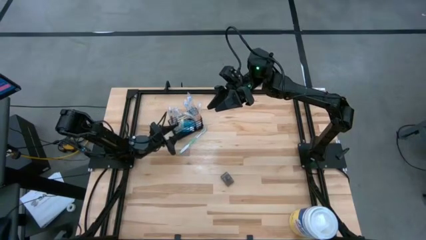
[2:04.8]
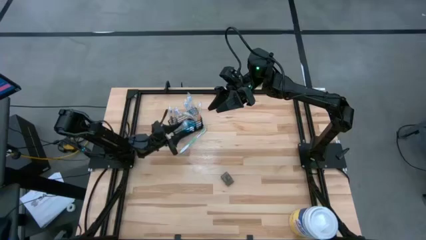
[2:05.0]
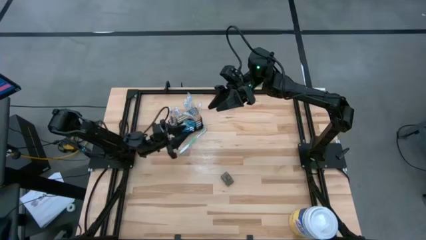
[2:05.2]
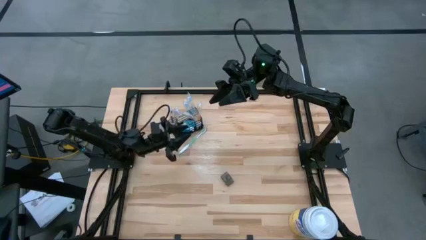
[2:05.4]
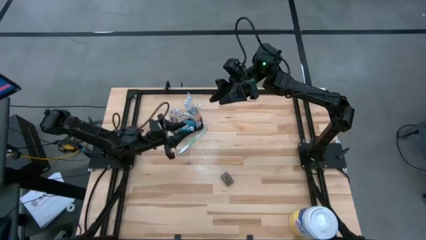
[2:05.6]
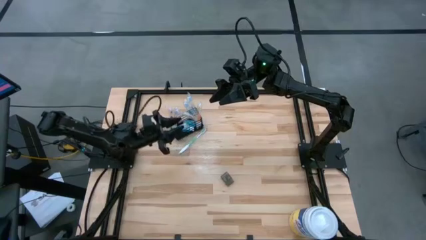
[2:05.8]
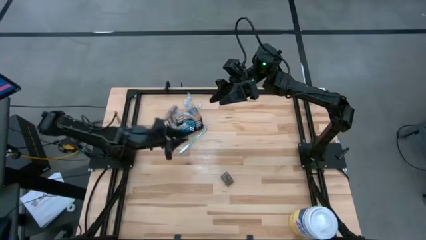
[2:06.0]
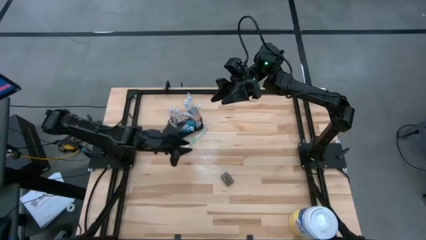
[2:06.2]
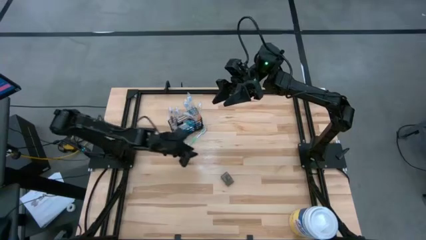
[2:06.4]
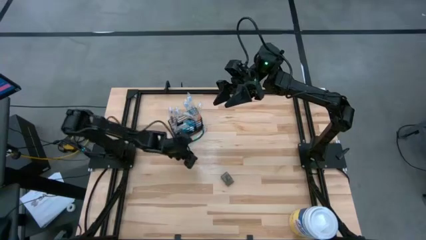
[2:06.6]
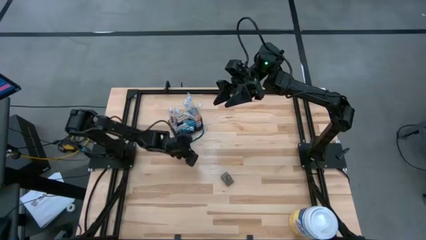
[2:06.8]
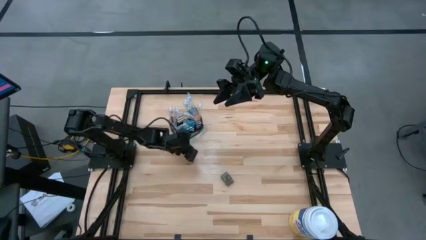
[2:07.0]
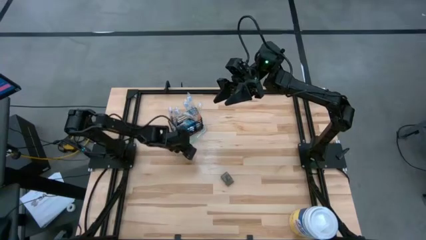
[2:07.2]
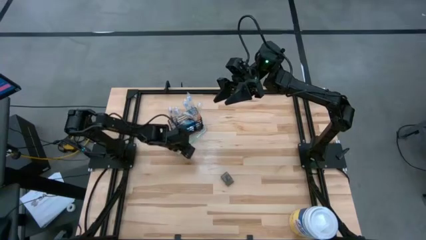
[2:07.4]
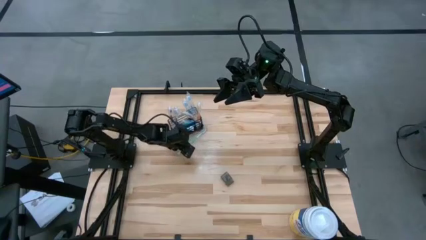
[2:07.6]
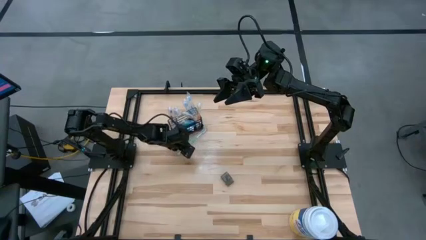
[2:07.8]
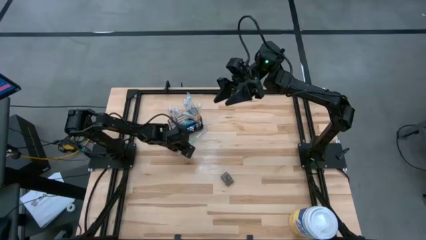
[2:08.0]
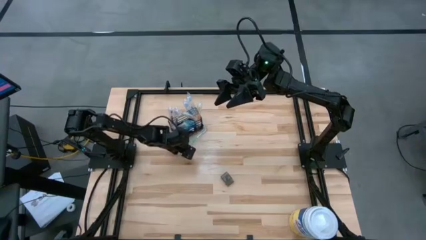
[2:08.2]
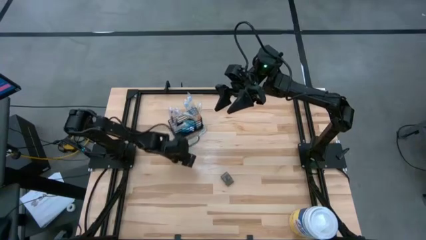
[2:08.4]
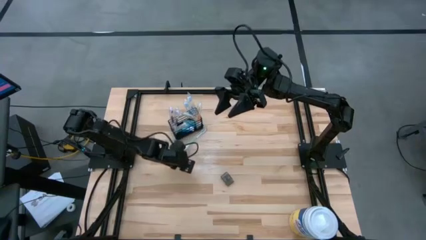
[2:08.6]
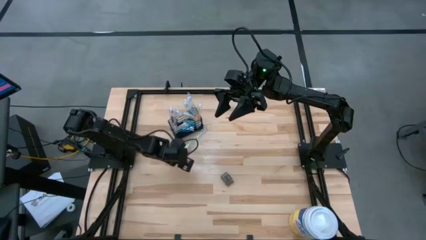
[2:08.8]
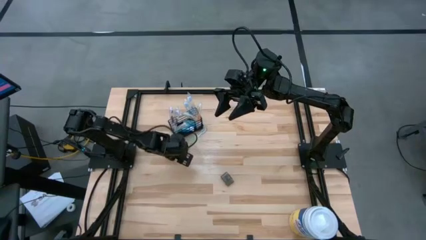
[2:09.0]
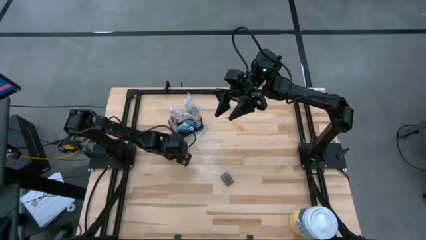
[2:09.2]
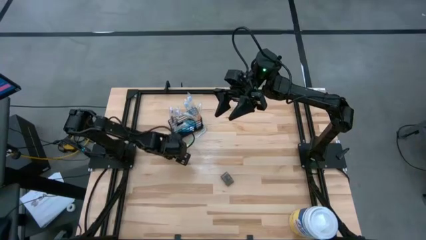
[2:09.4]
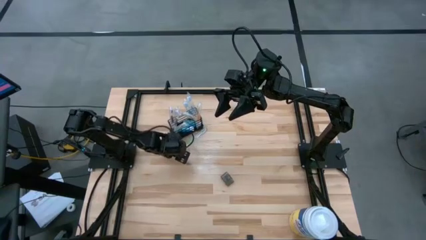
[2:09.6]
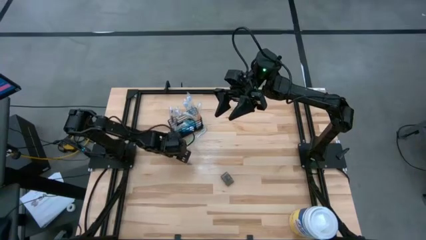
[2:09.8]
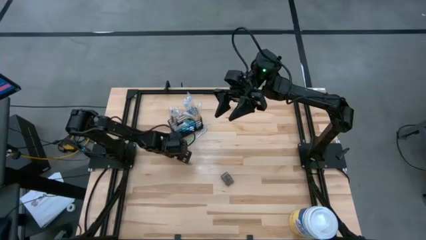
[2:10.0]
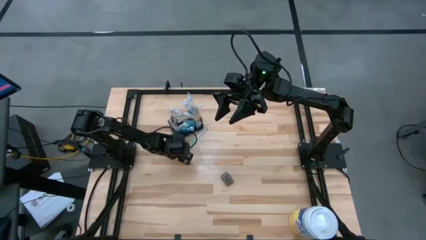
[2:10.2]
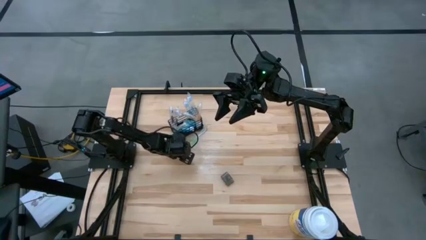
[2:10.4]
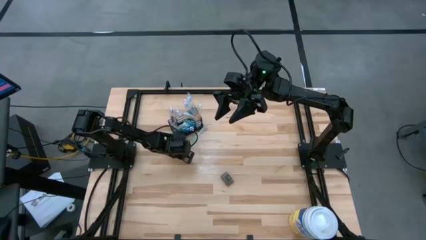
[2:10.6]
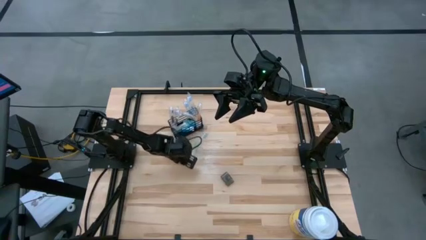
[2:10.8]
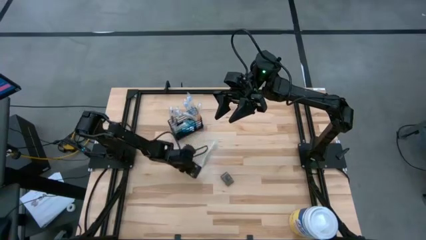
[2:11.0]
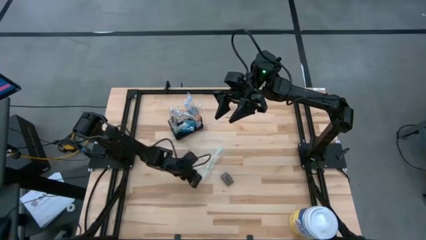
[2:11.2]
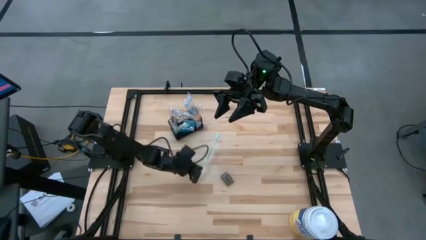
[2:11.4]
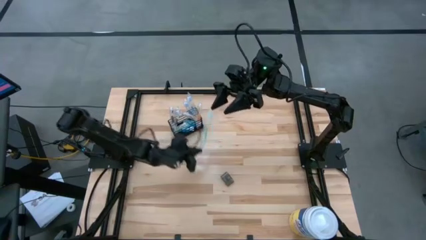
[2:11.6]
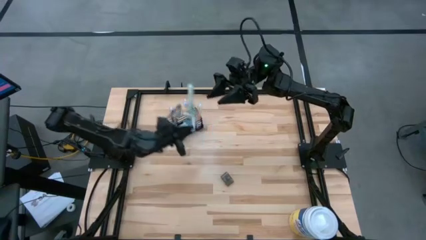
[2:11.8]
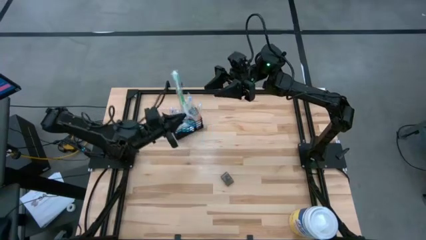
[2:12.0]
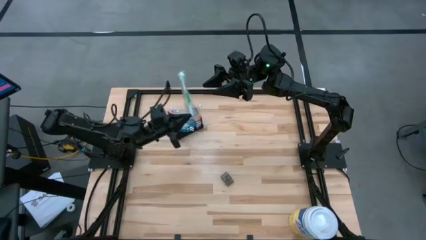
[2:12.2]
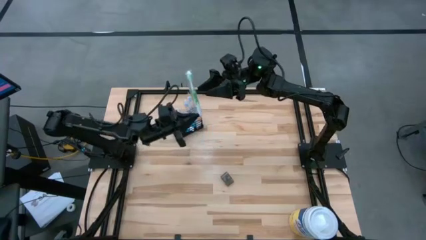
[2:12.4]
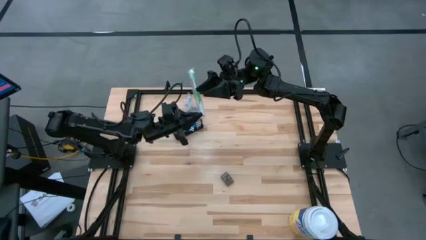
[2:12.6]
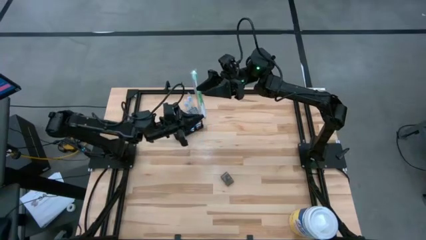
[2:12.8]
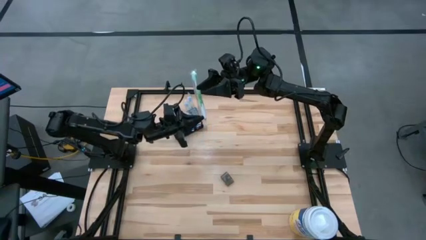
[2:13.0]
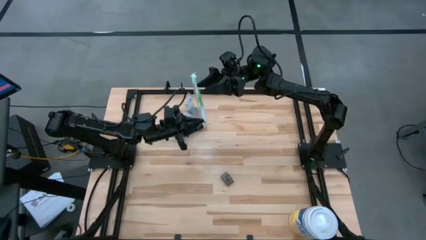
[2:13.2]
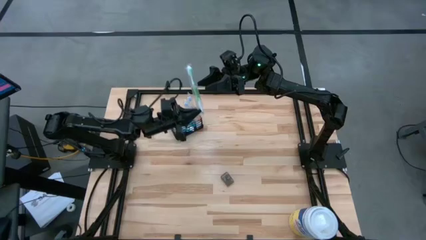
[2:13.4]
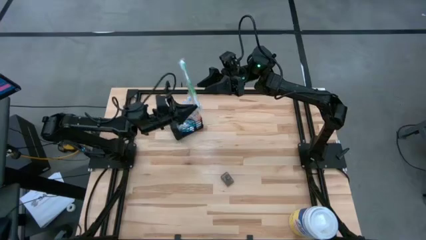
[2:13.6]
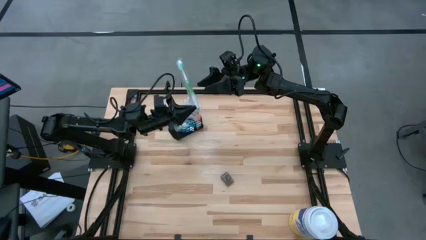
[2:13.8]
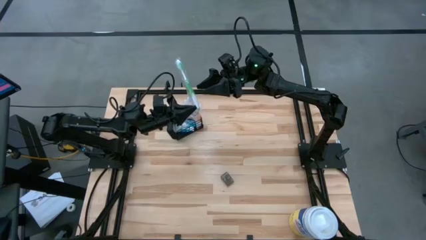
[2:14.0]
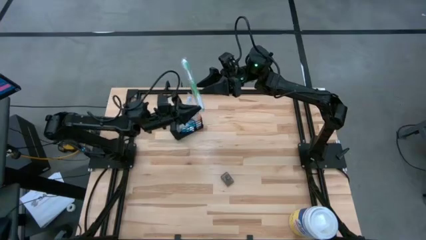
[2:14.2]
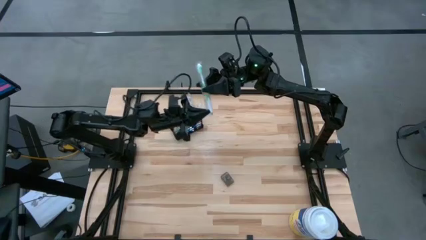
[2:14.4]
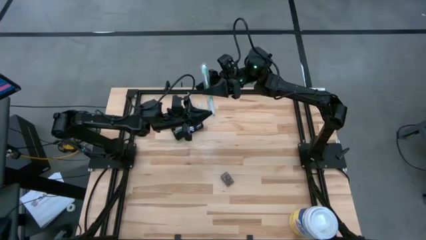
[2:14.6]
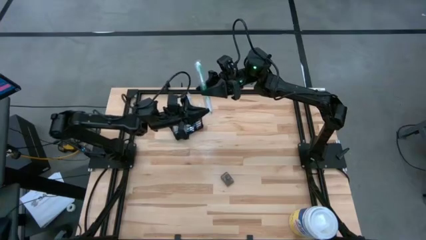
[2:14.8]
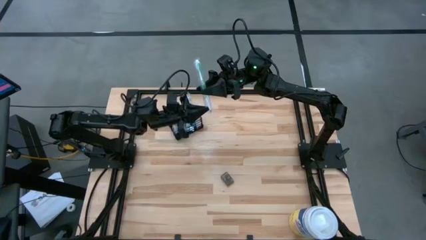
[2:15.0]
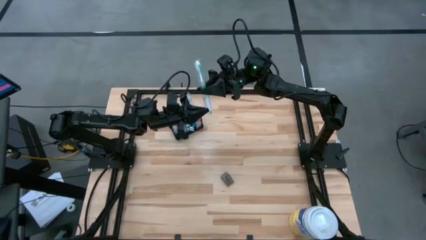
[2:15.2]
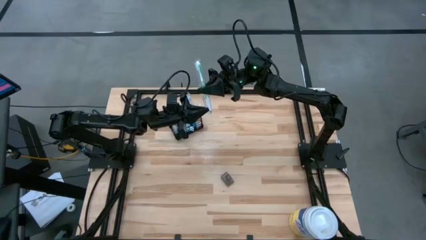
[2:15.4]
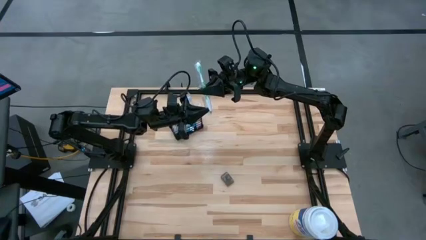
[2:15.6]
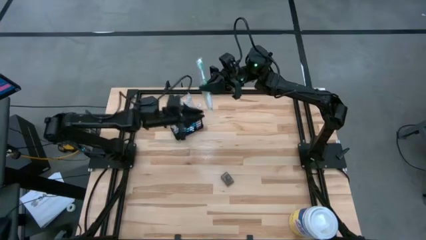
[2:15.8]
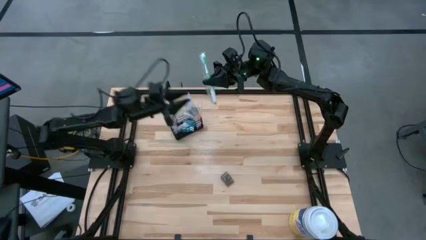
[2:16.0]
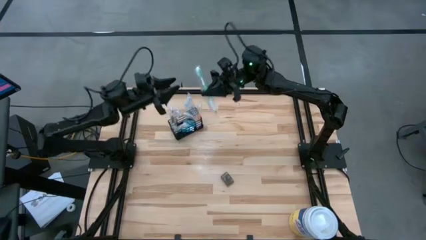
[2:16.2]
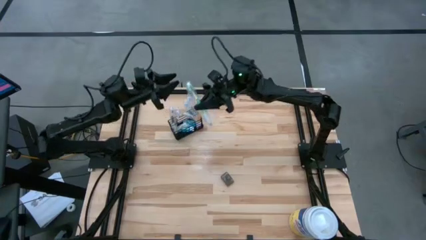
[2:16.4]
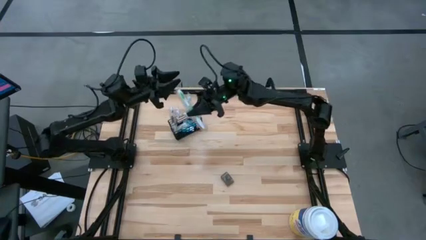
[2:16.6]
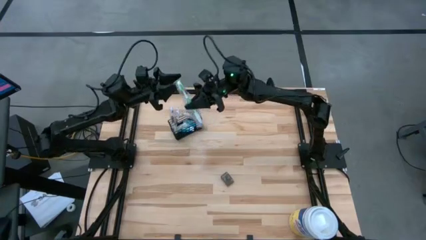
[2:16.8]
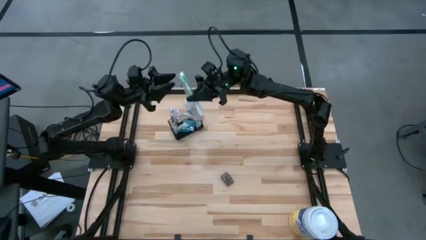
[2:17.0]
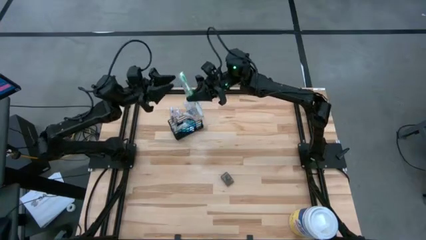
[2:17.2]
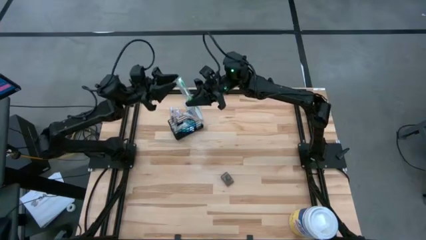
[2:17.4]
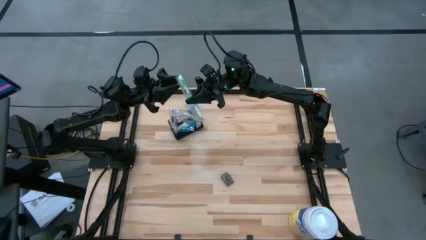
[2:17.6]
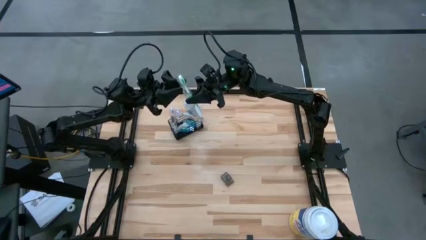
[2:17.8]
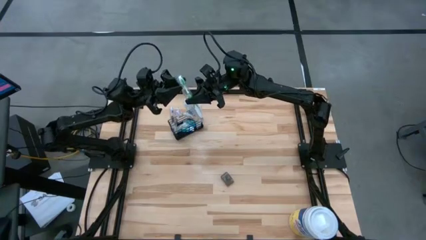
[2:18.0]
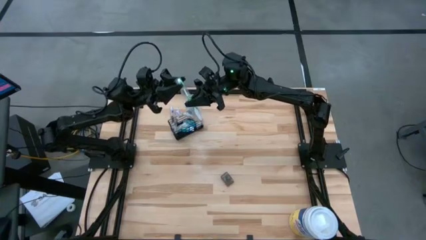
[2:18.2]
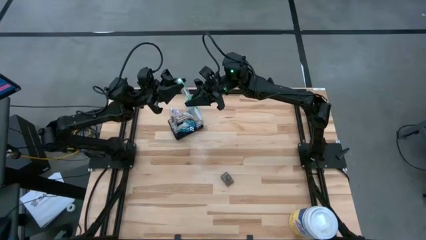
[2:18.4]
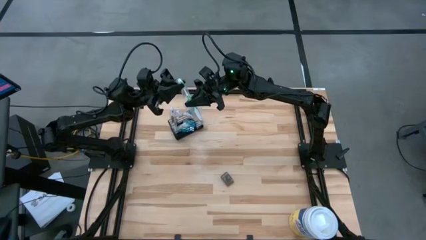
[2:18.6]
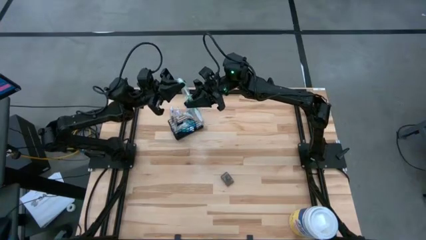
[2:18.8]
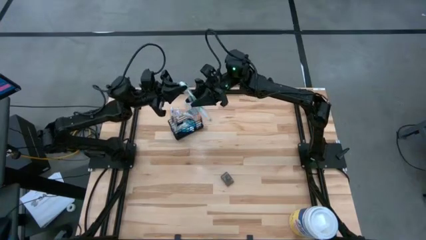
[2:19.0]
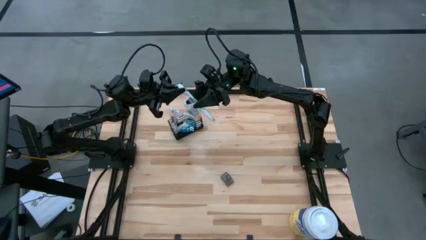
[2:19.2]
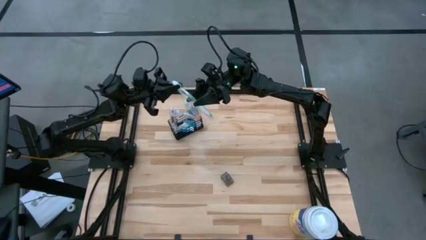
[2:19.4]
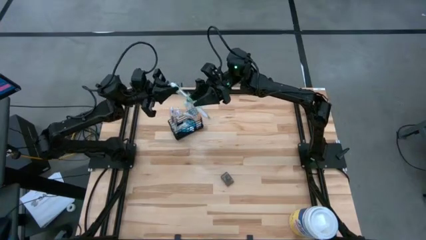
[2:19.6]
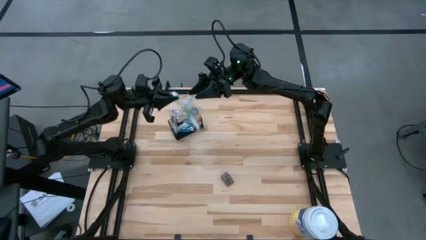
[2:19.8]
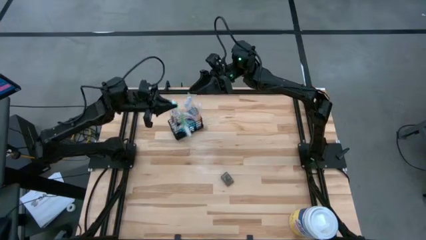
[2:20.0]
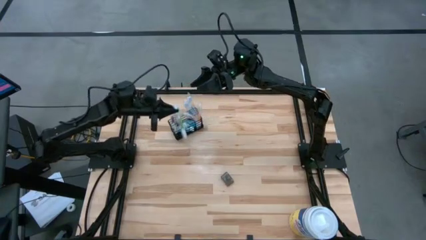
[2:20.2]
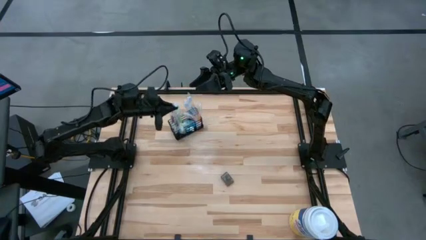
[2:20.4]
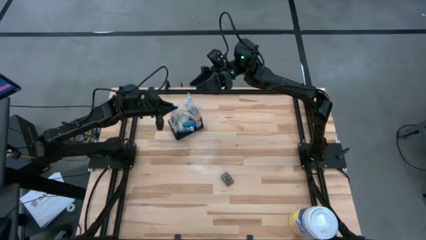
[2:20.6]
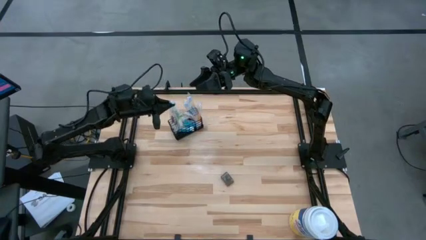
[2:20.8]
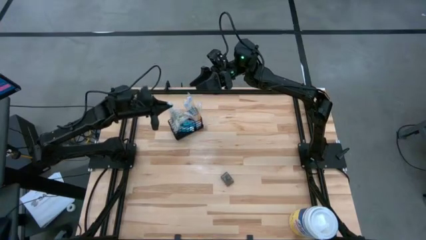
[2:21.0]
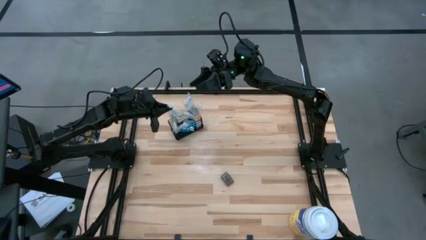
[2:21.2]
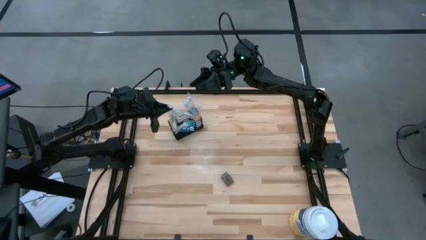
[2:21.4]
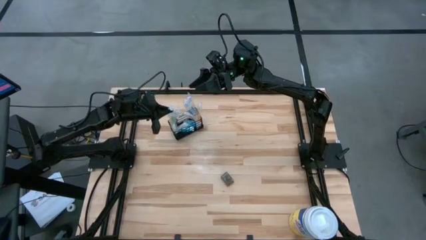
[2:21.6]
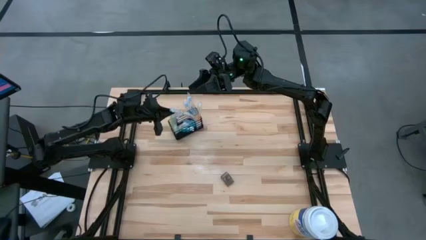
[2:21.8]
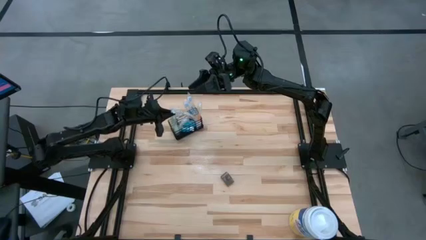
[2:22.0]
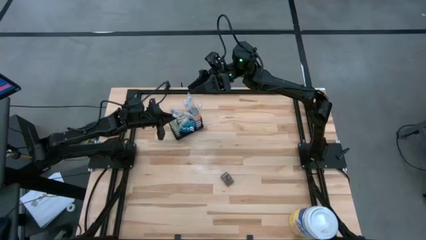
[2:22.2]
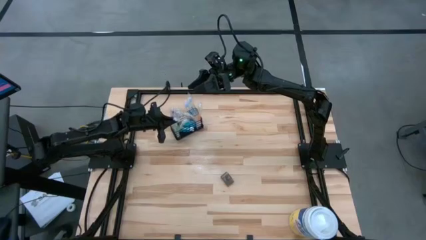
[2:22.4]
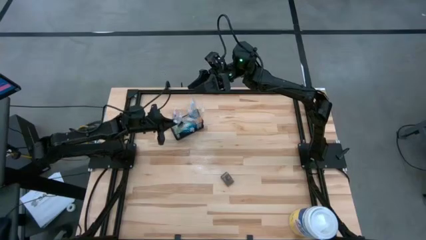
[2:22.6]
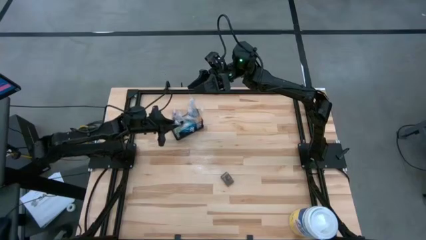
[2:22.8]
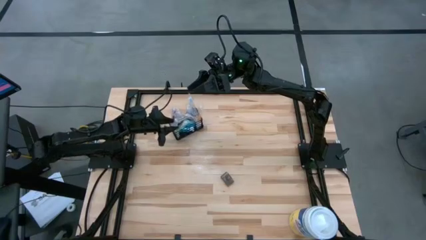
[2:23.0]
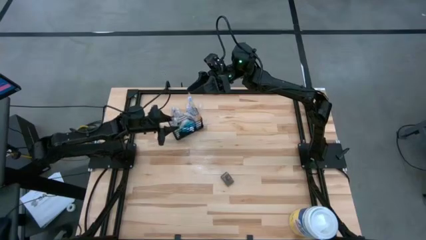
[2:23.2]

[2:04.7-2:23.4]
Task: Pick & Place toothbrushing station
Put the green toothbrush into the black organizer
